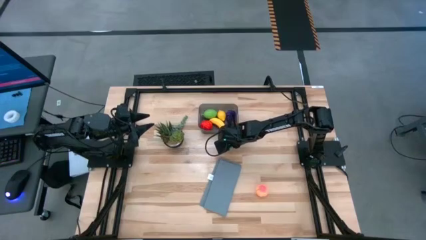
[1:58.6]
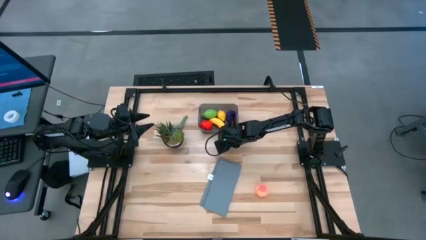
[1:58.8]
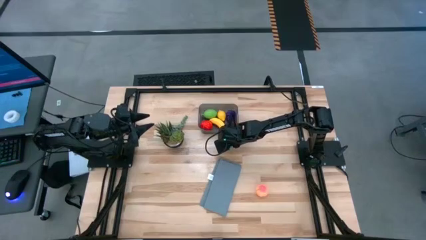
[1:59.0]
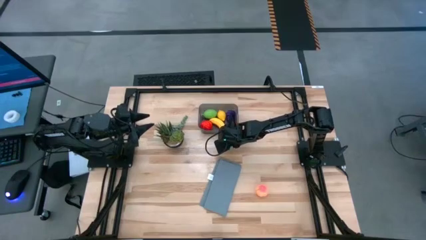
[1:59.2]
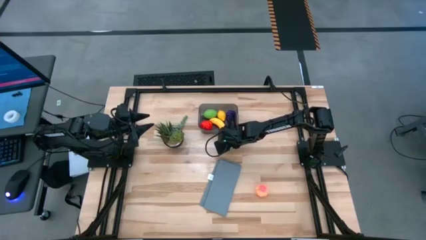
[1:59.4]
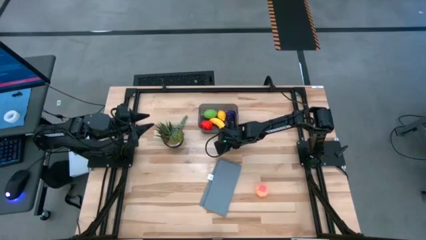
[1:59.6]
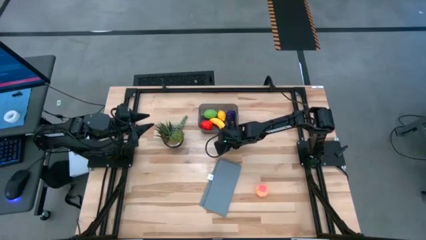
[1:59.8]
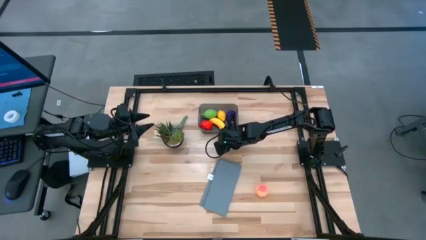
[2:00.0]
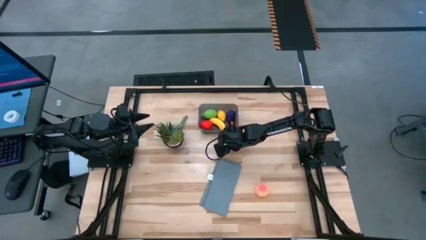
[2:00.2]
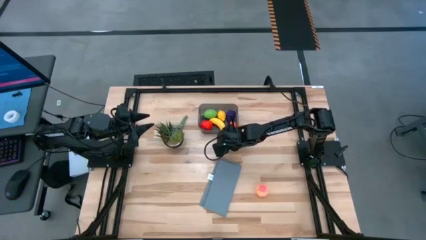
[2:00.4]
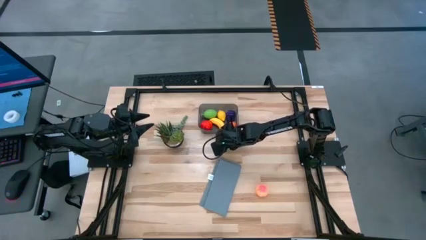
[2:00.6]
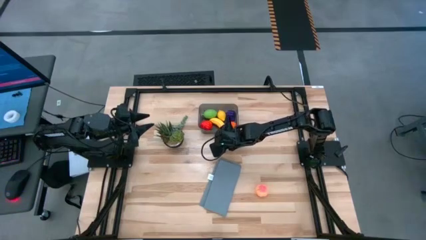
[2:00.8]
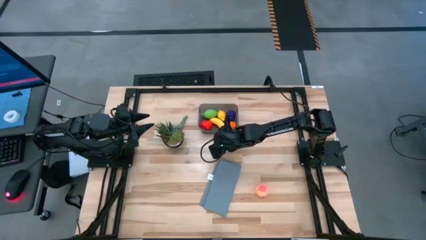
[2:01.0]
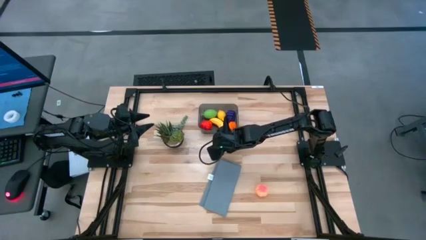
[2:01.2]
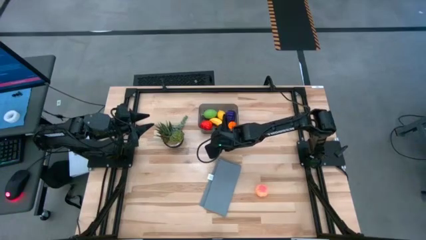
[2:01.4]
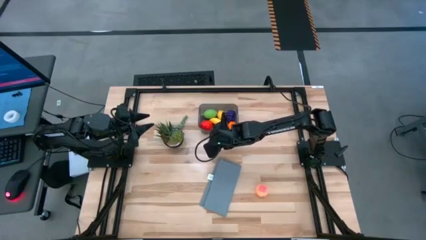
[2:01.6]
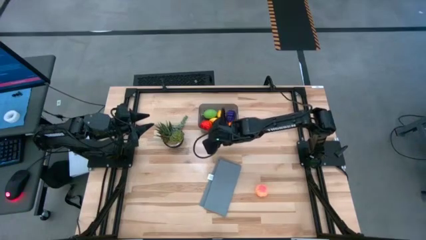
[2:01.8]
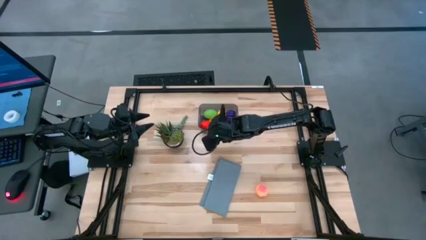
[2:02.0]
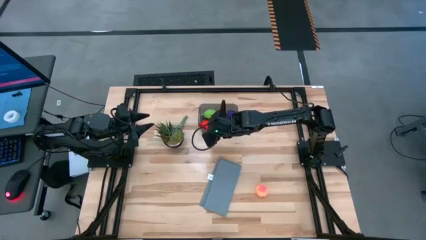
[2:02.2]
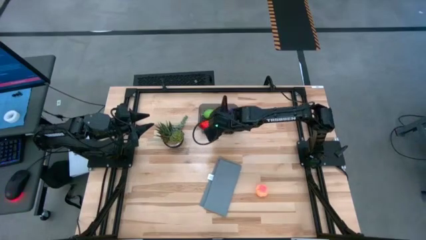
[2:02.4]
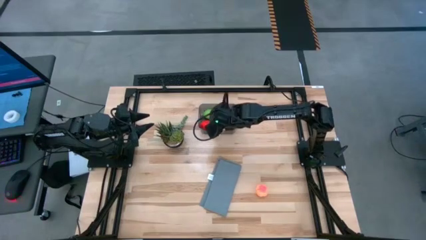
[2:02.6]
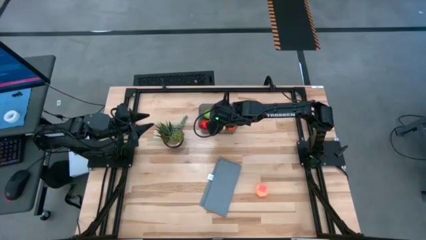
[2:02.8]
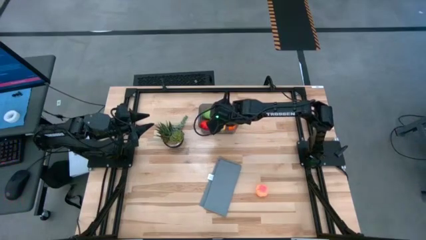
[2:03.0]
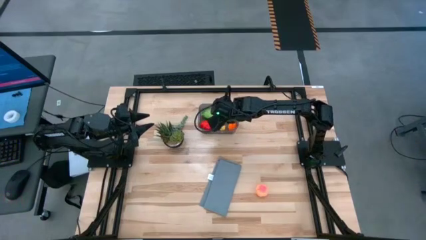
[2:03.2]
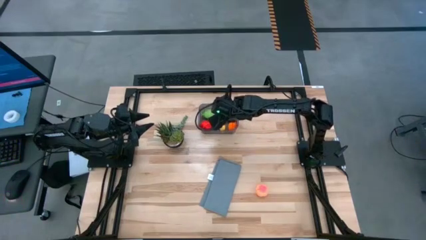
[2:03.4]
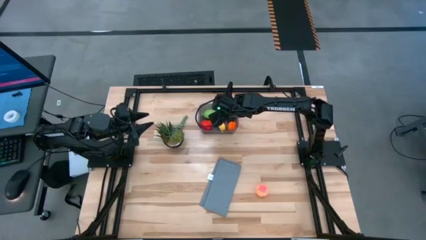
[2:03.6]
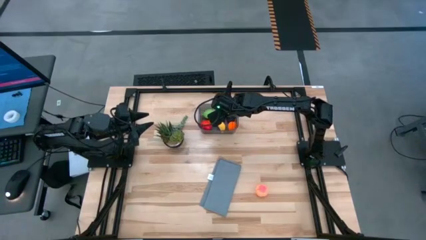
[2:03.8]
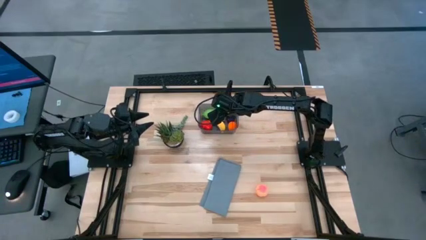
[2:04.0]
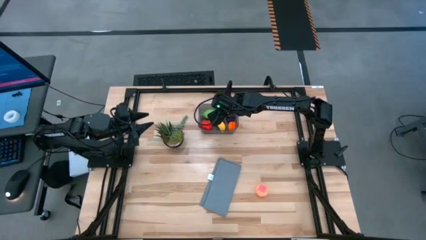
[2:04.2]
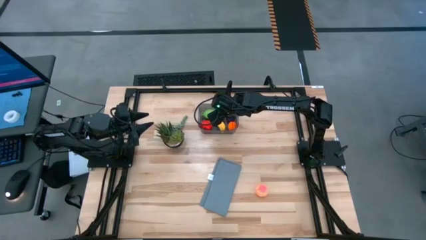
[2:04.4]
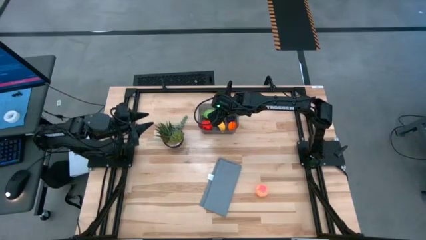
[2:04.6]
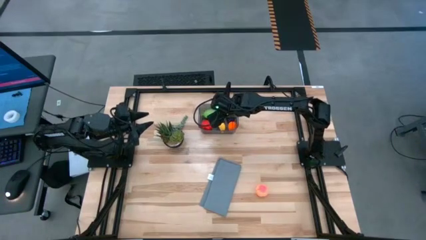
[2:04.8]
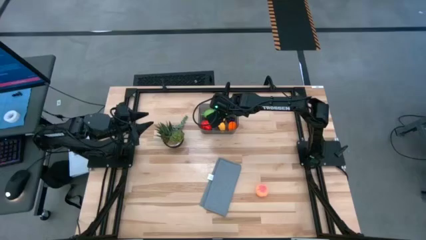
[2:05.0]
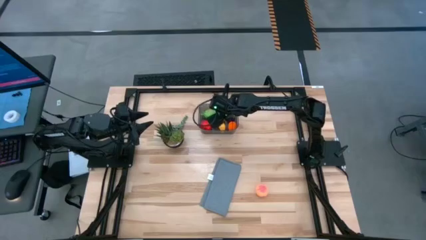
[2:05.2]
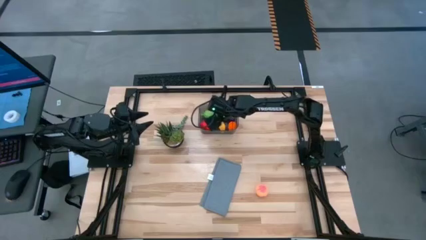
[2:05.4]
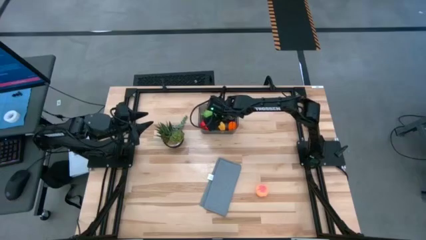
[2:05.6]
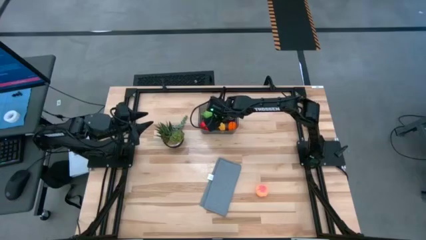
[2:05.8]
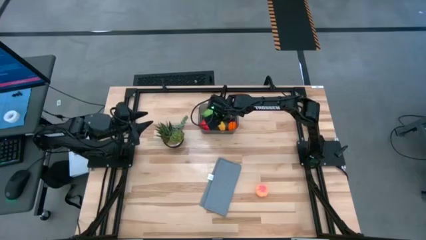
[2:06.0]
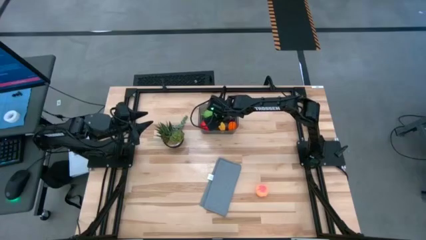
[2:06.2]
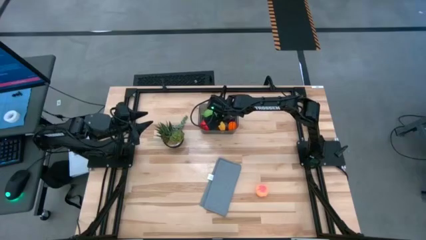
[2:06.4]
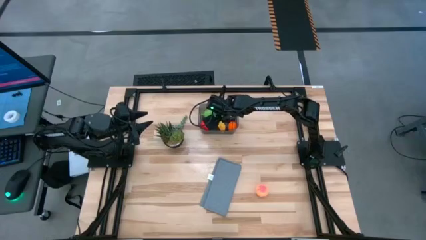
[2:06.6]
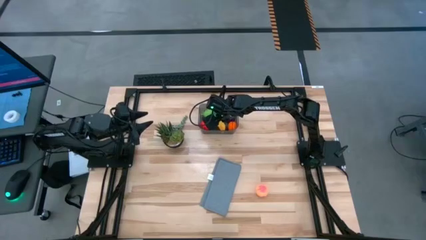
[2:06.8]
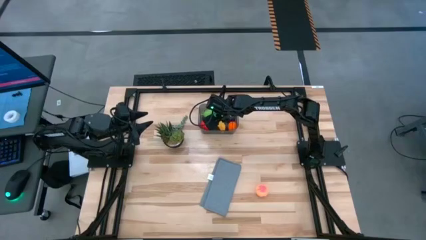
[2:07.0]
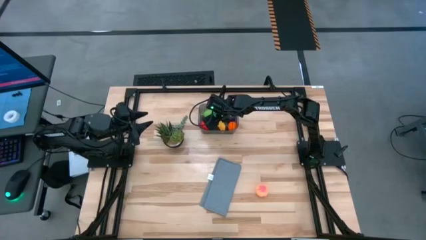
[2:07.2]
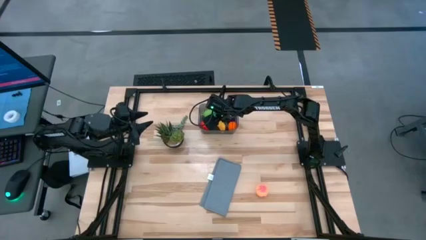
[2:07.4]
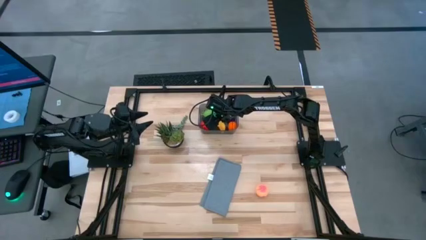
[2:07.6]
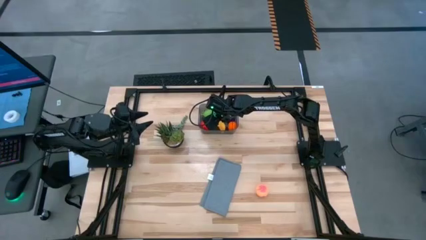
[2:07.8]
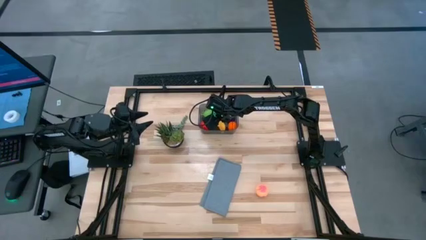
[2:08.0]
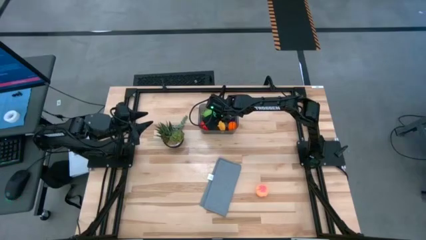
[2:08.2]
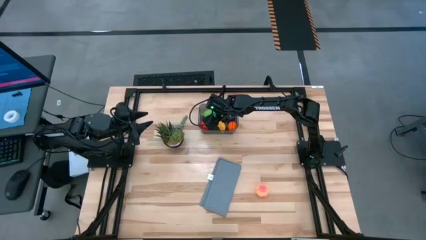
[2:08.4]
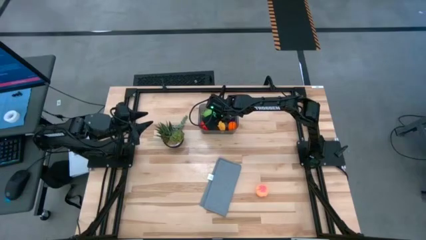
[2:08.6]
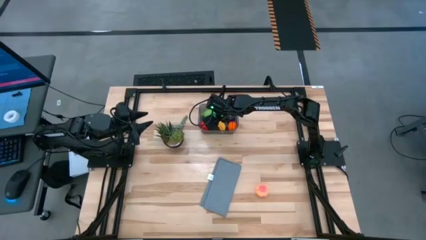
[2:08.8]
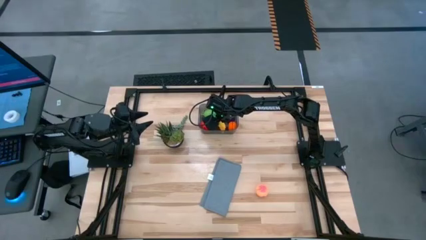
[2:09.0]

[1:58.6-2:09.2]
Task: Pick and placing Produce into tupperware
Put the bell pepper into the black bin

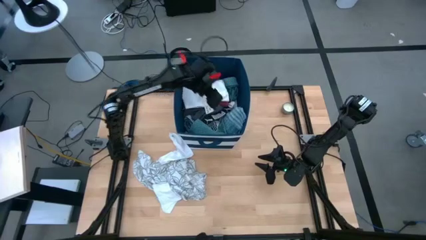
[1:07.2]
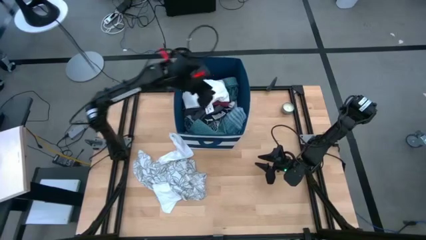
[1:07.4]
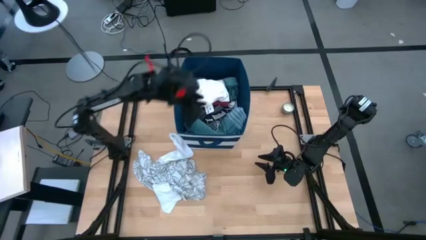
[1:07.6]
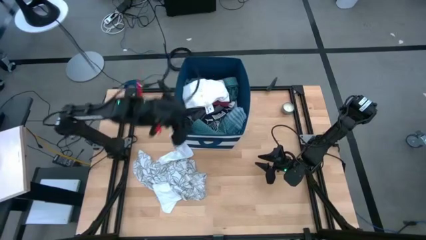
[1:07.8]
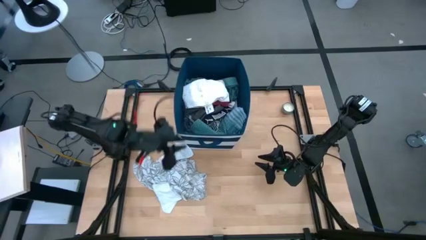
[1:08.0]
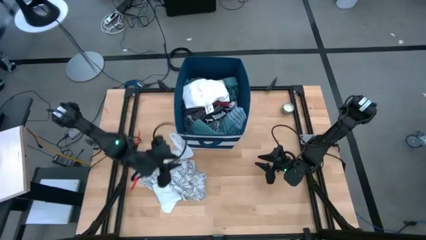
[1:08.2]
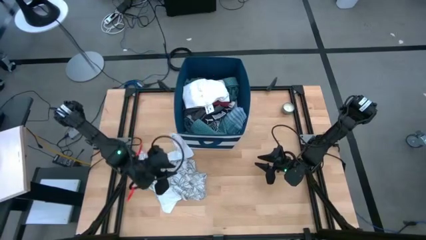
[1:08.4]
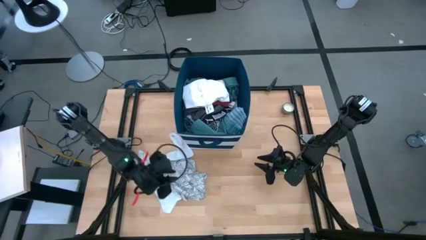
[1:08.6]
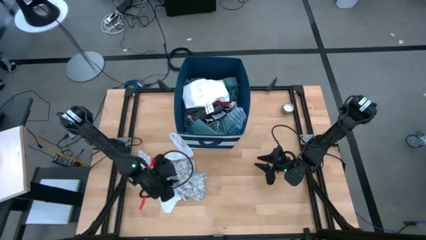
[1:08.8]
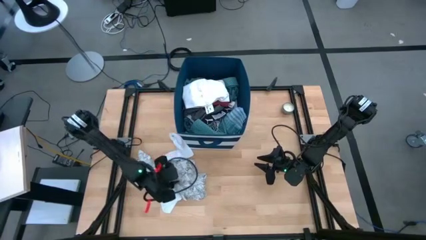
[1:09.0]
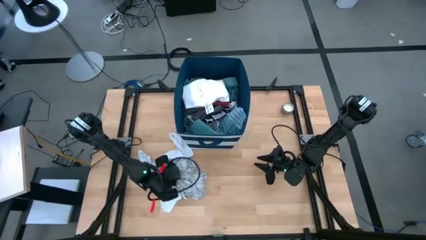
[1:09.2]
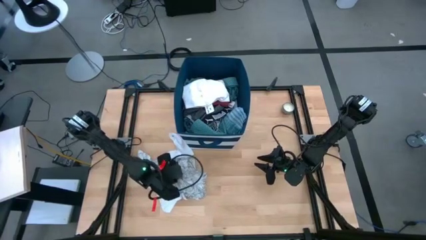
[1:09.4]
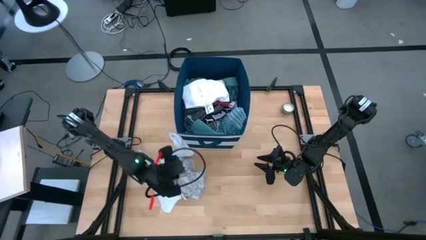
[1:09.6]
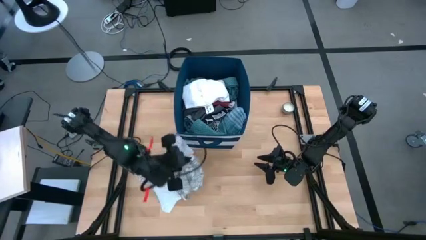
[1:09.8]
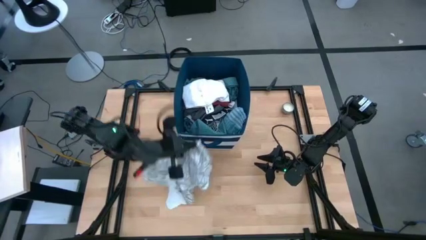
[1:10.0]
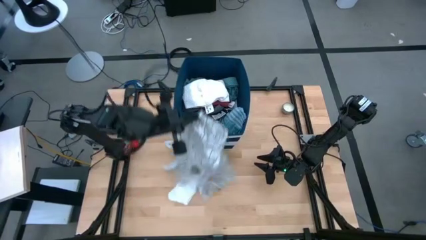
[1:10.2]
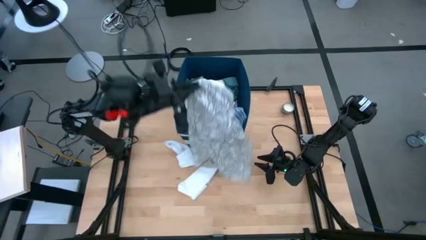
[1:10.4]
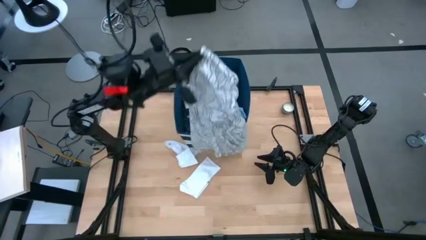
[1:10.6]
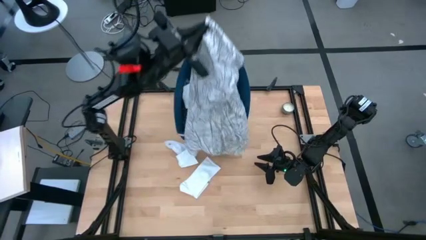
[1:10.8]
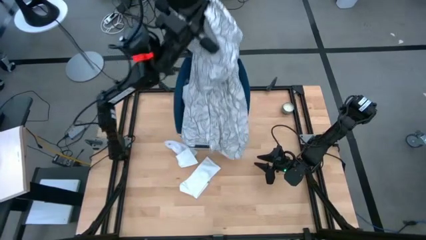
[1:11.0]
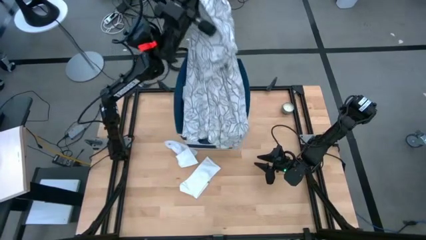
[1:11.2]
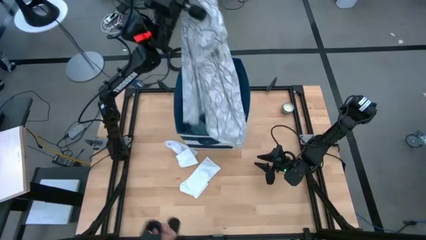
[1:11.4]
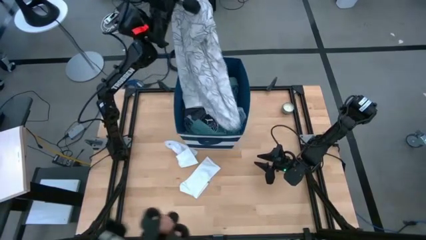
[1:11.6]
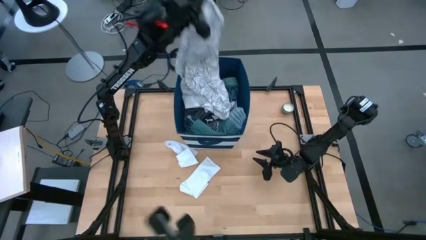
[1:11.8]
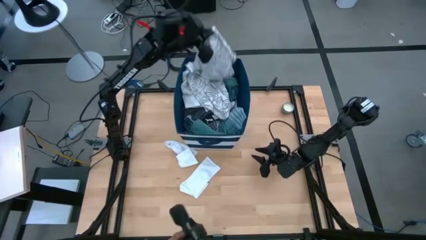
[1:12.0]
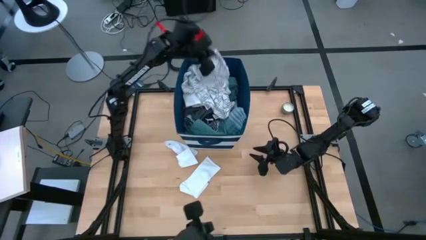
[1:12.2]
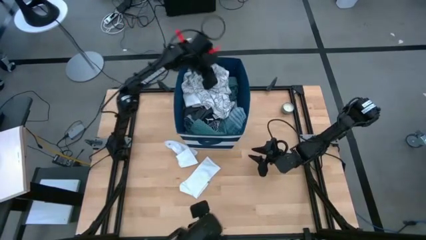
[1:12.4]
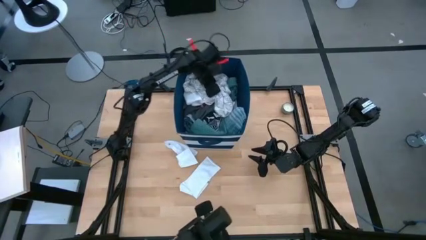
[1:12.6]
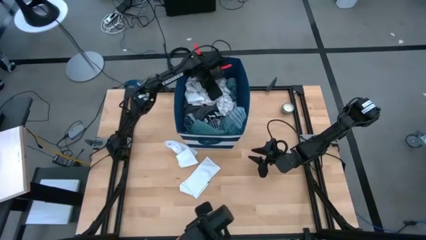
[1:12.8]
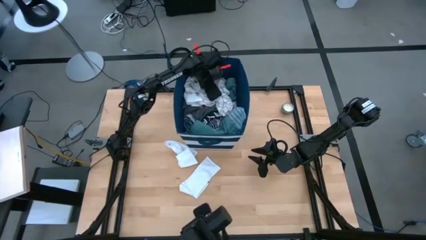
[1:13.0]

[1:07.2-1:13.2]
Task: Sort clothes
Put the white pattern shirt into the blue bin
